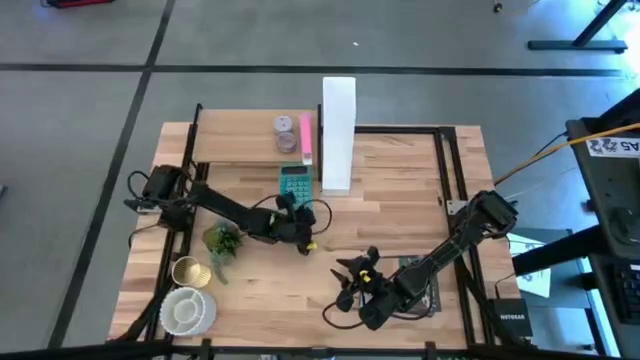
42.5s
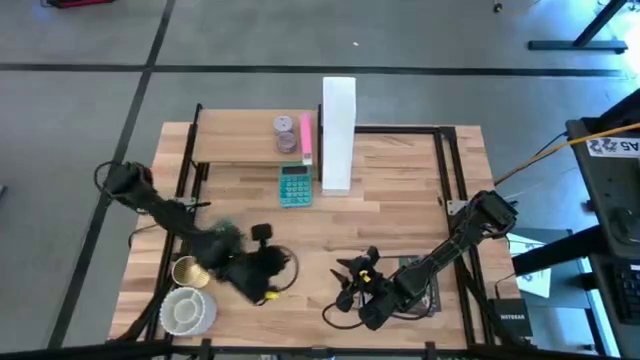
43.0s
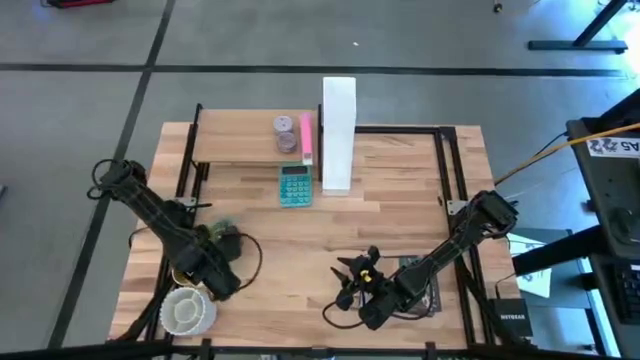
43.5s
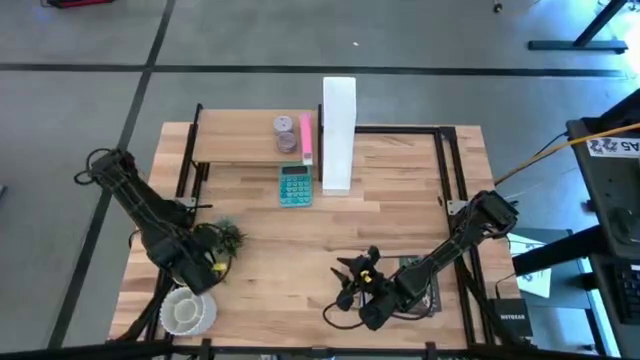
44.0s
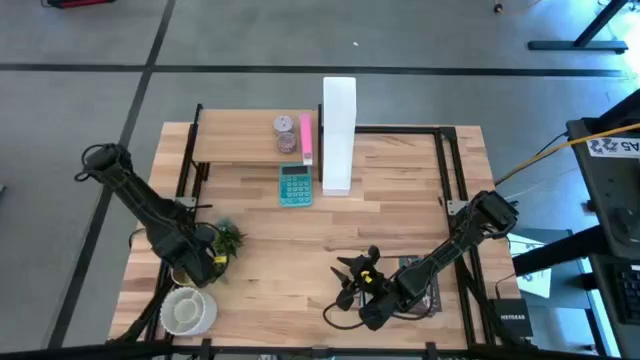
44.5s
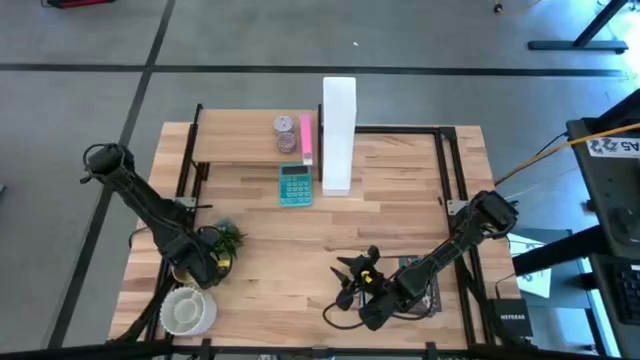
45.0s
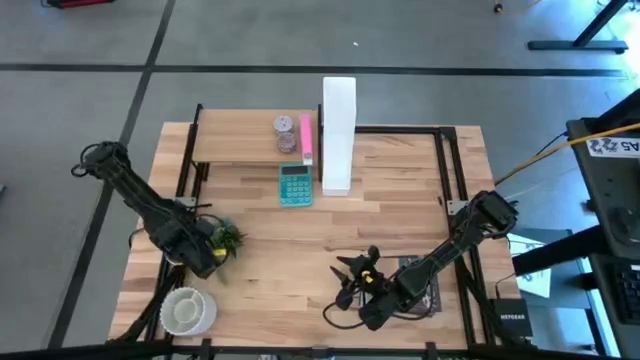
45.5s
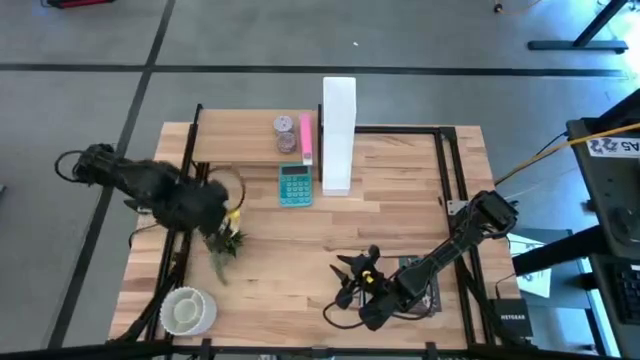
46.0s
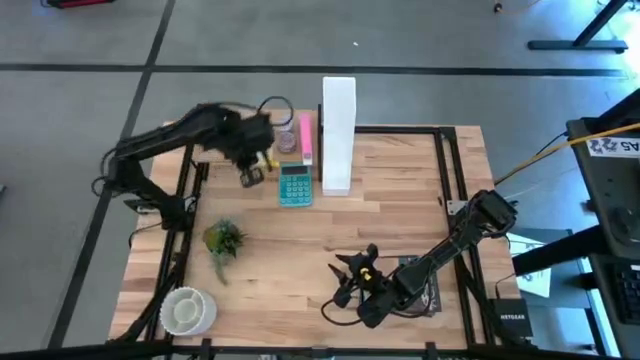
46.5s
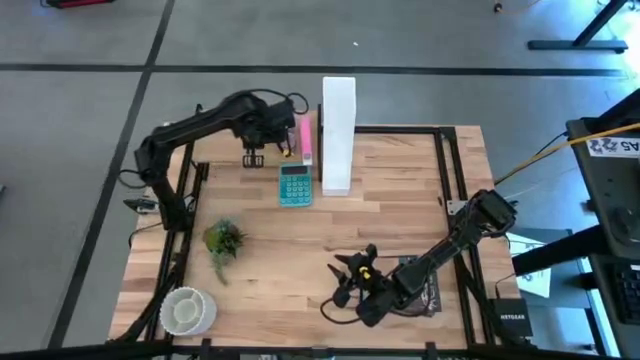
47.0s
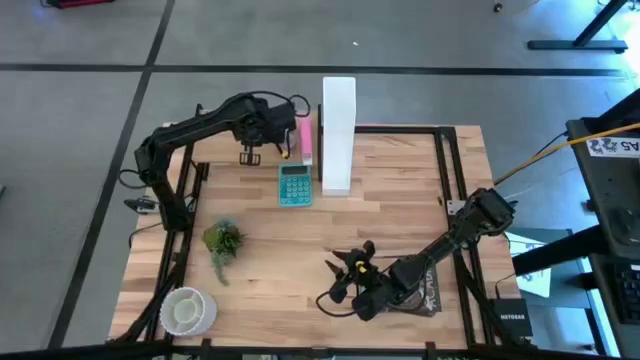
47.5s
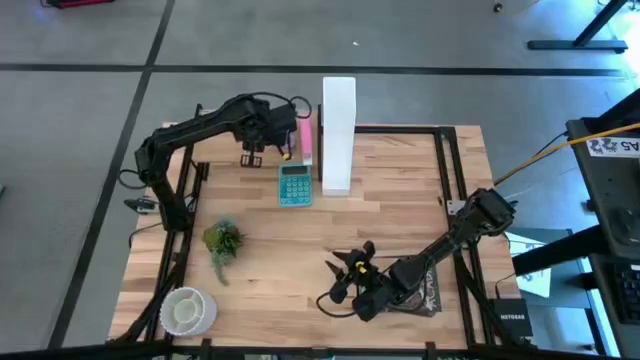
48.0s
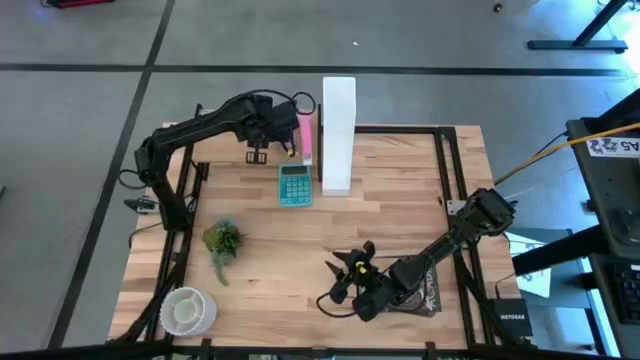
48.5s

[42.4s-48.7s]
Task: Stock shelves
Put the yellow pen organizer on the shelf

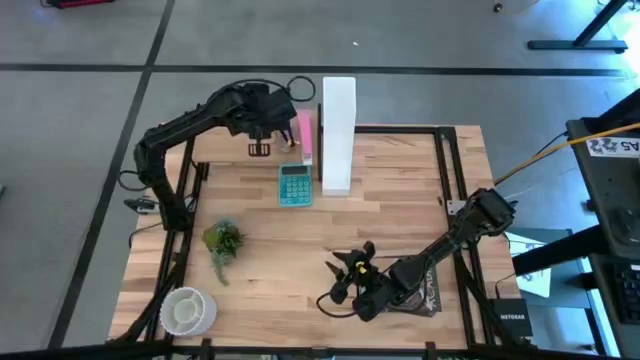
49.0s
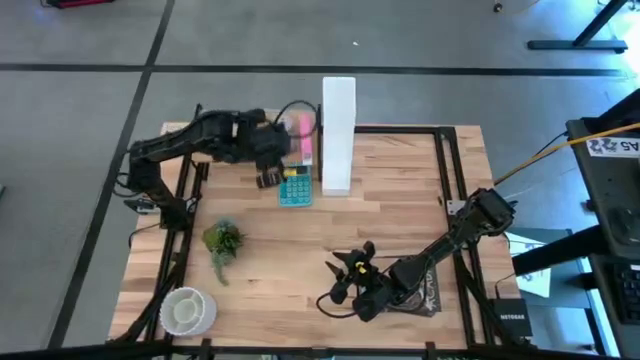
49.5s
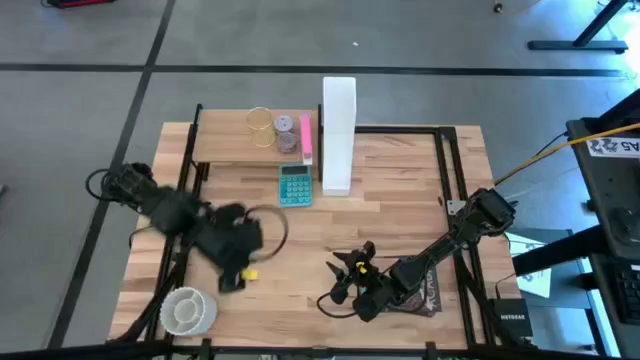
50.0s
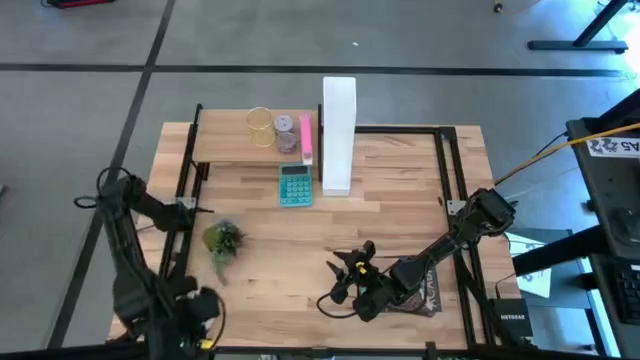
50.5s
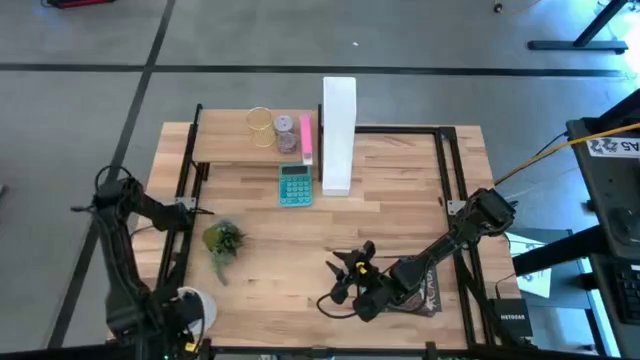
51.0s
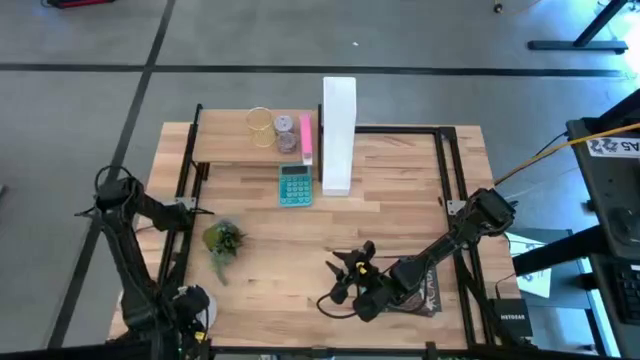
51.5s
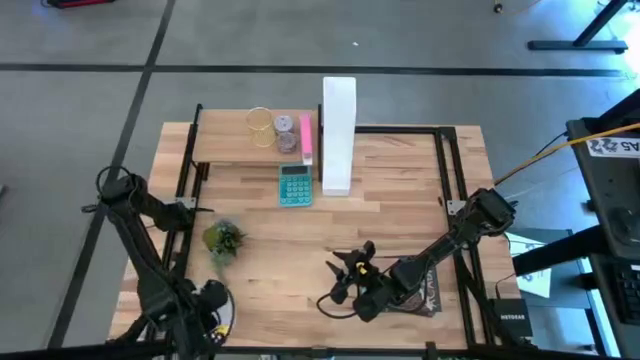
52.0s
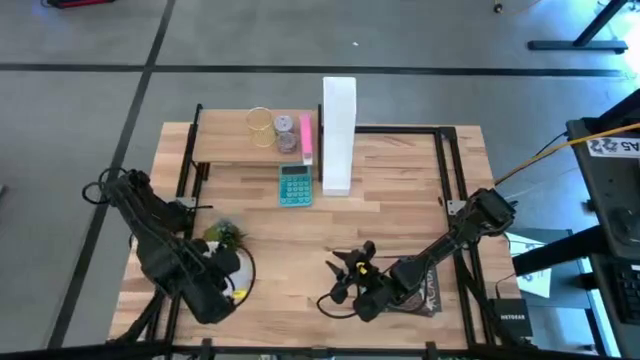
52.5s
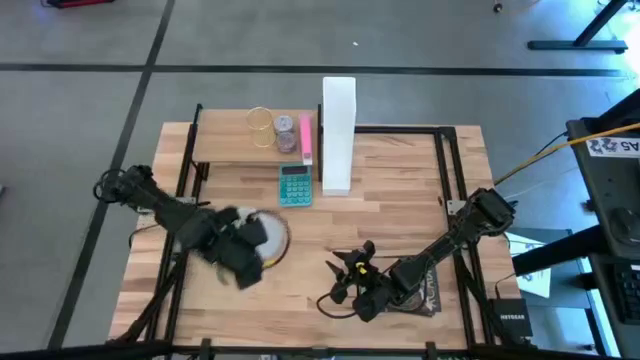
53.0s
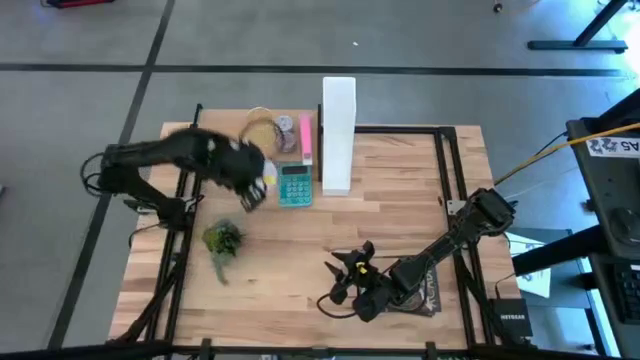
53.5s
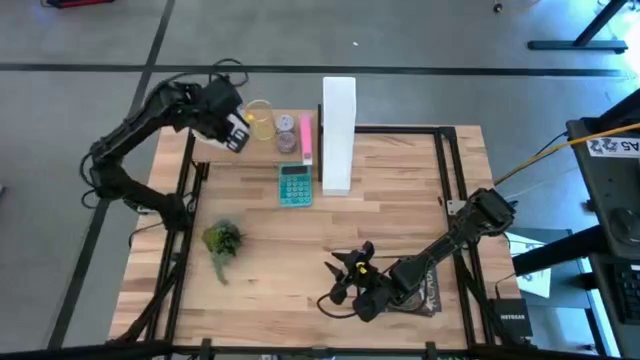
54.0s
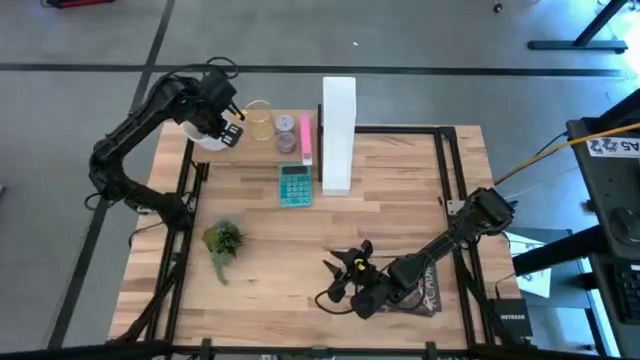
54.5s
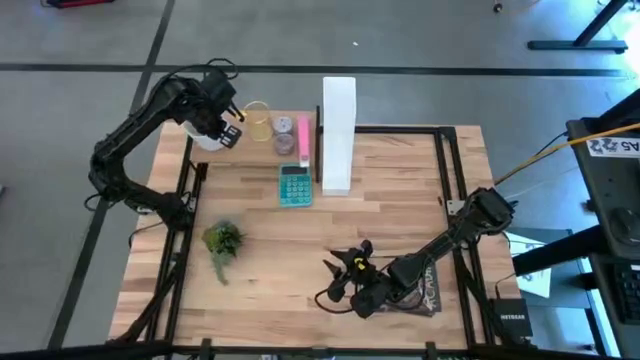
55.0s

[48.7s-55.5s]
Put the white pen organizer on the shelf

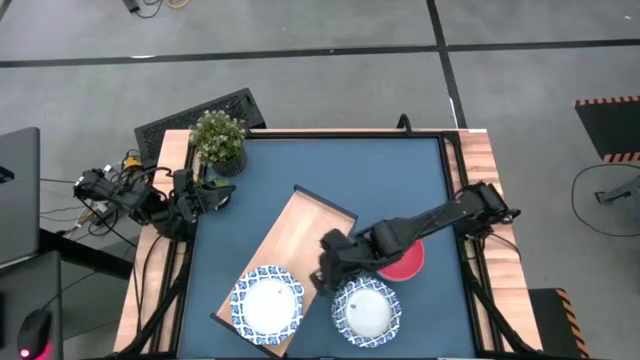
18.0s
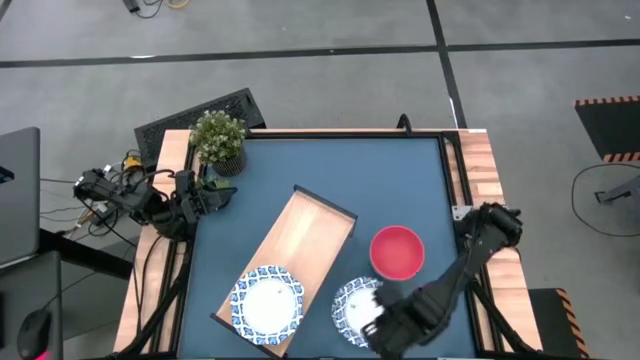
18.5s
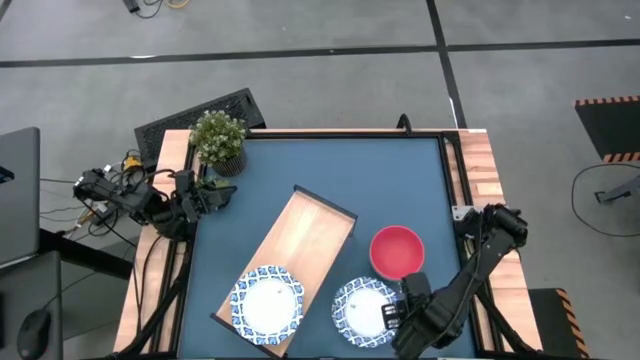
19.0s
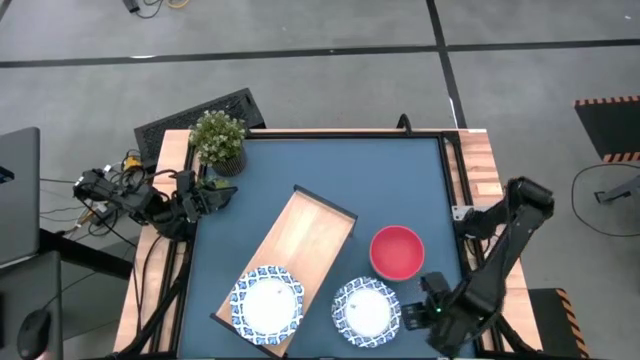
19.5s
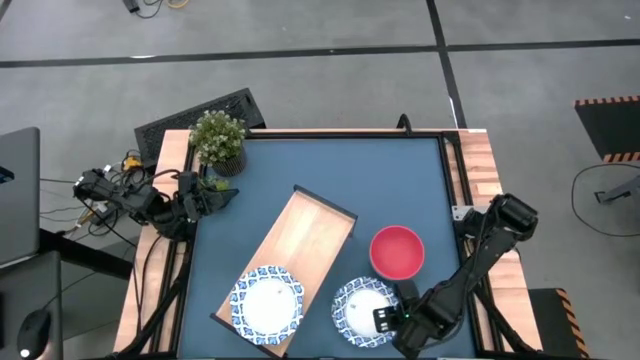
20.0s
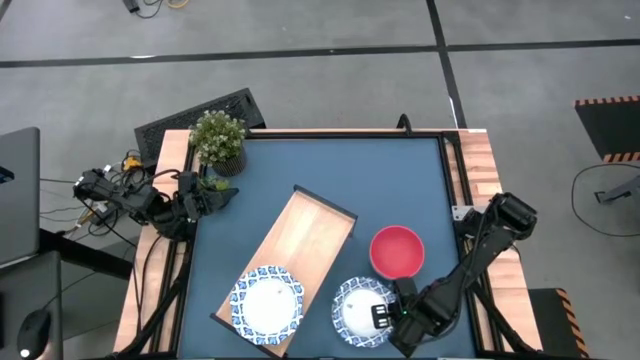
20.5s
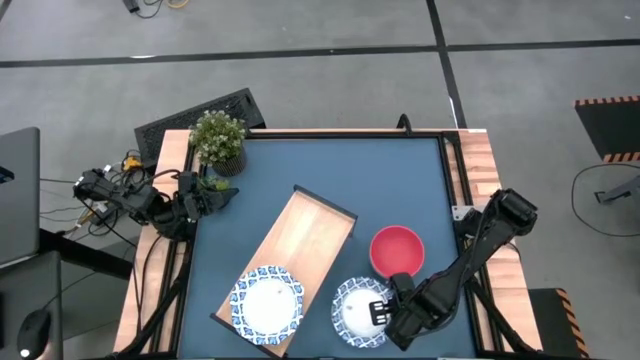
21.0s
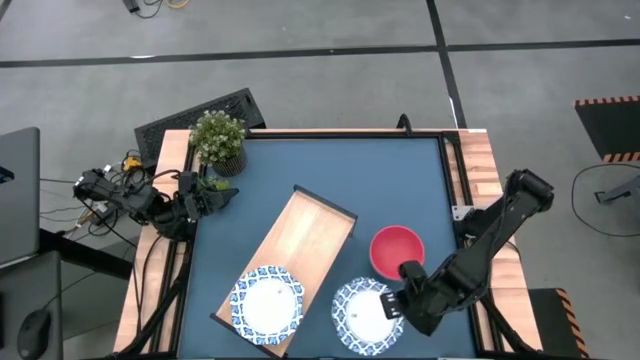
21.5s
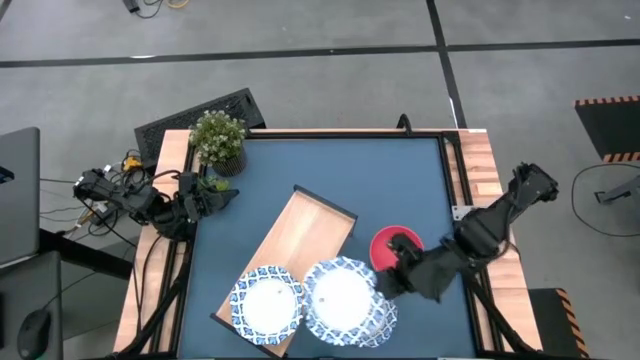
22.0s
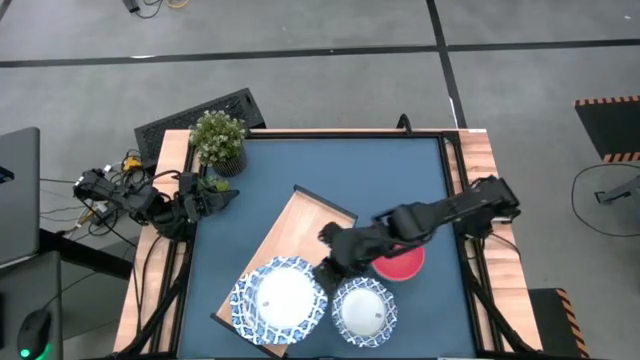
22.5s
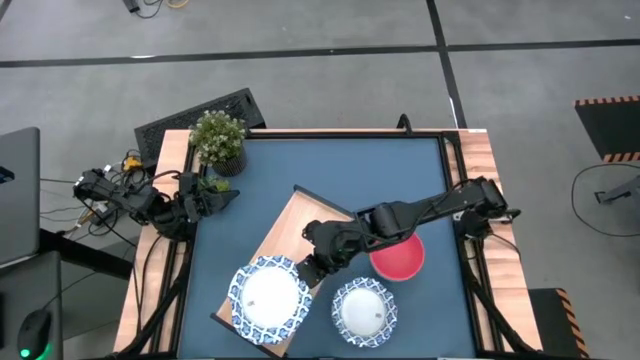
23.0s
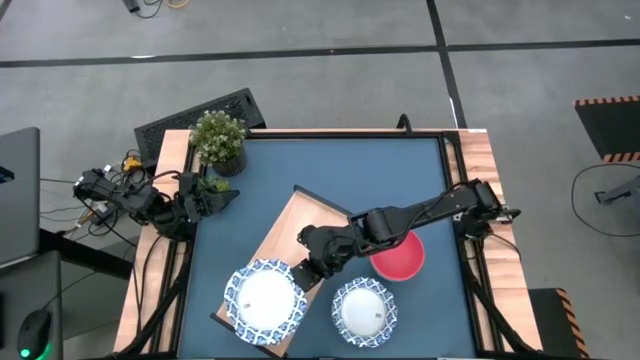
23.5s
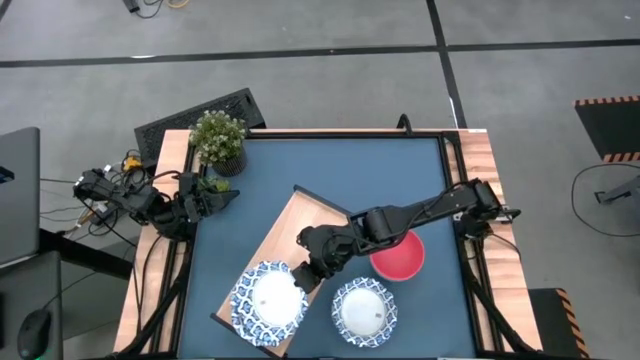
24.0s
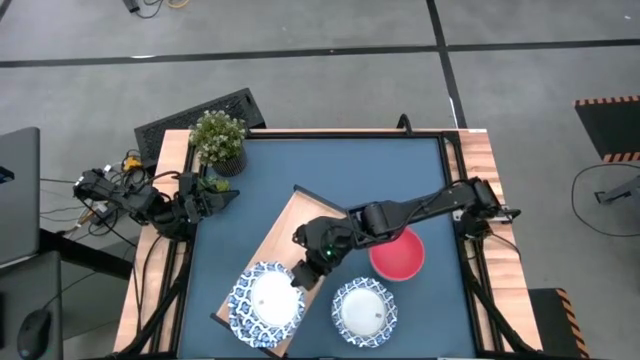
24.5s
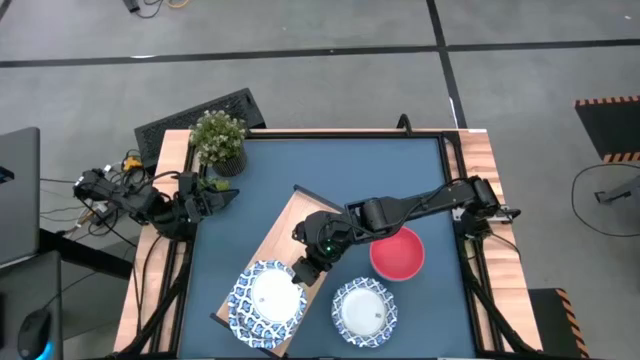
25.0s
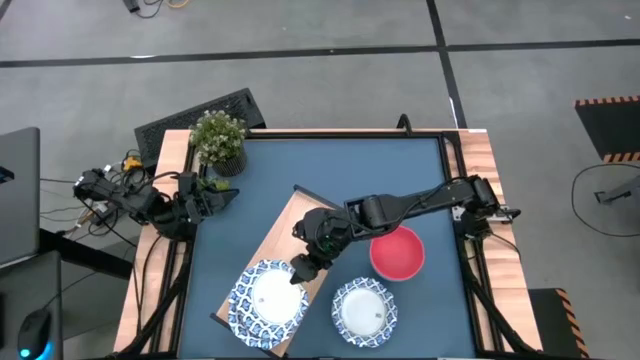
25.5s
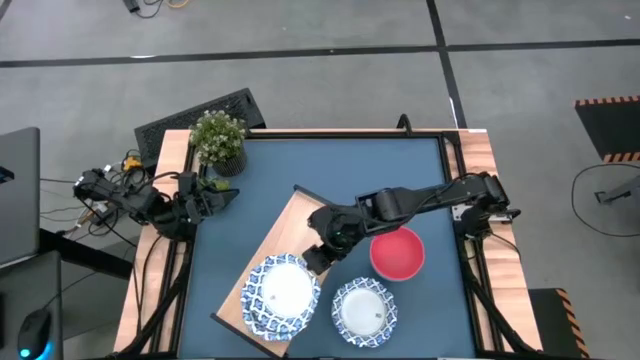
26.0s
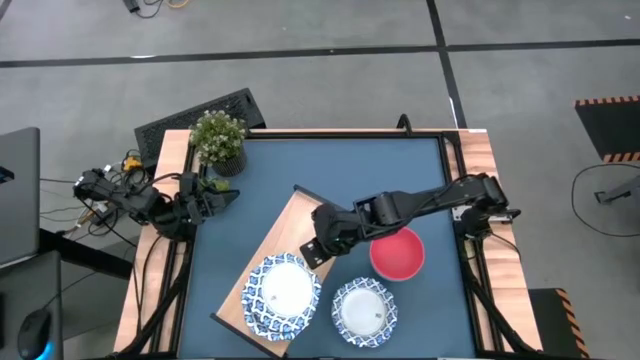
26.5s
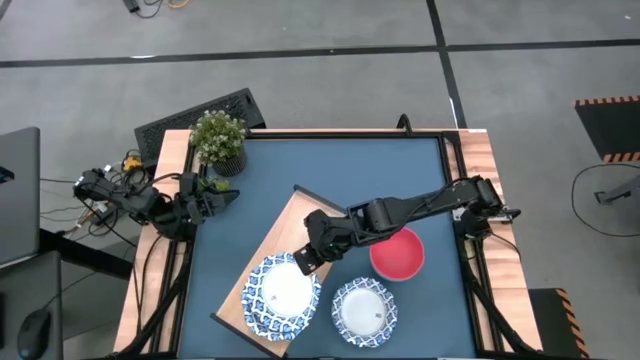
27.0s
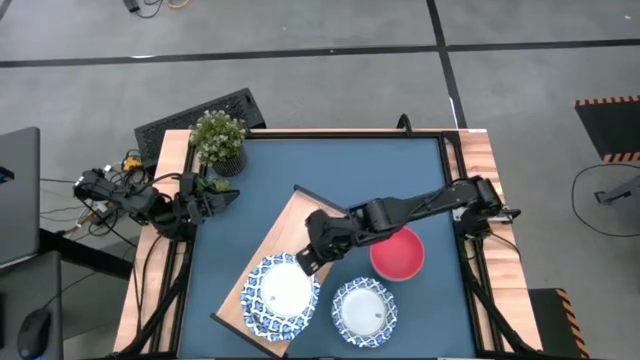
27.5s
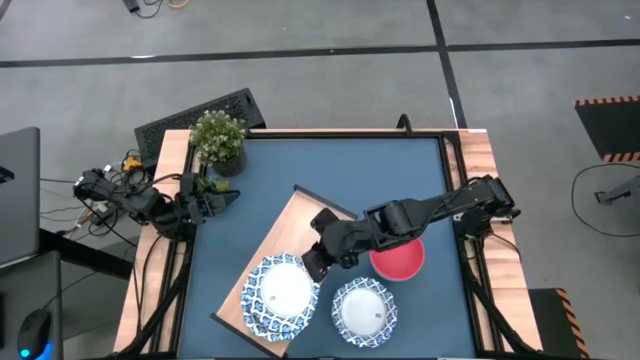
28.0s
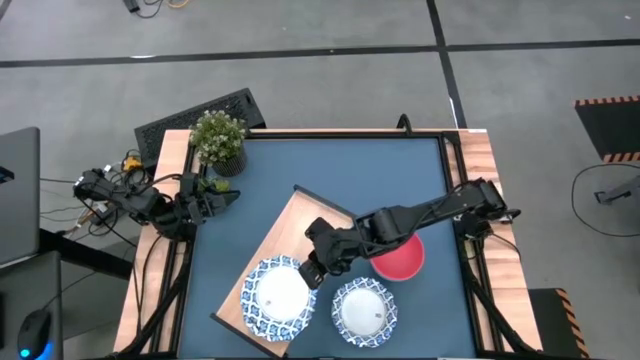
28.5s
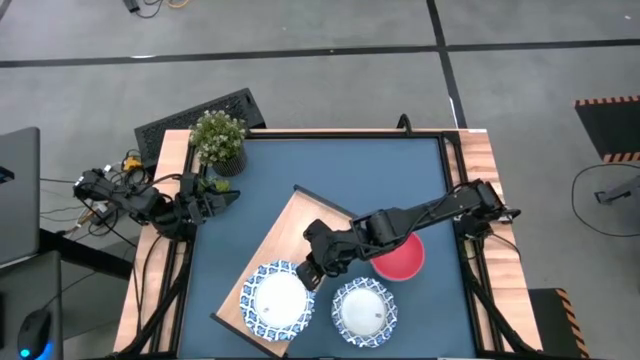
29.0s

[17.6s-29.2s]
Task: Place and stack bowls onto a shelf
Stack the white bowl on top of the other white bowl on the shelf
